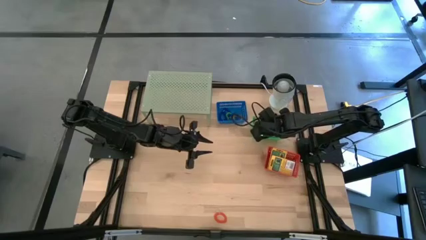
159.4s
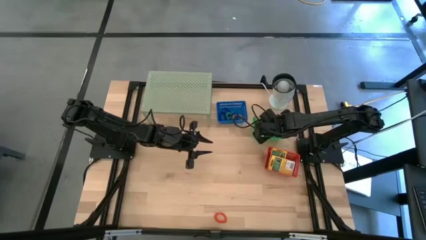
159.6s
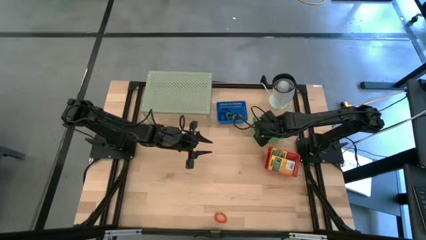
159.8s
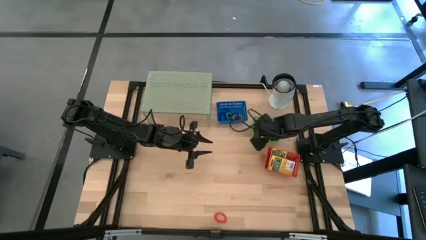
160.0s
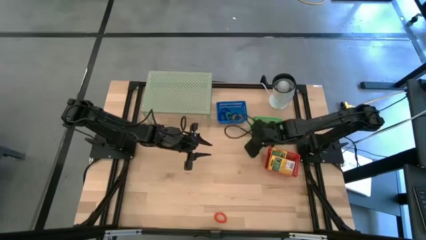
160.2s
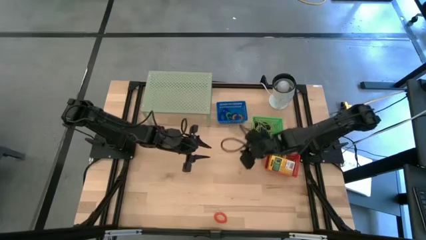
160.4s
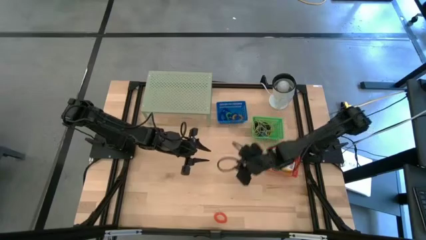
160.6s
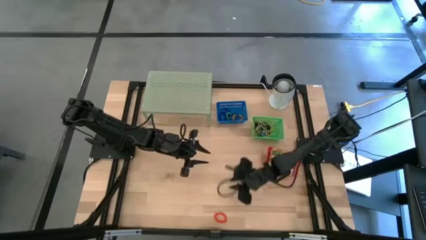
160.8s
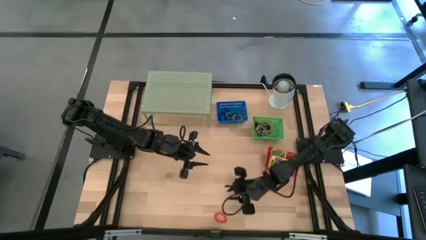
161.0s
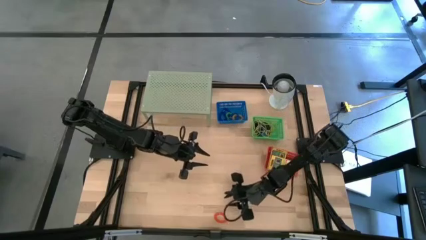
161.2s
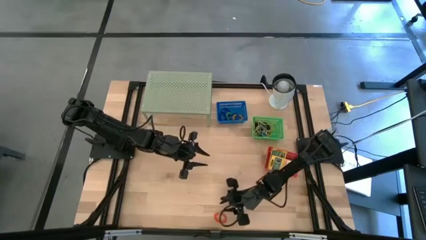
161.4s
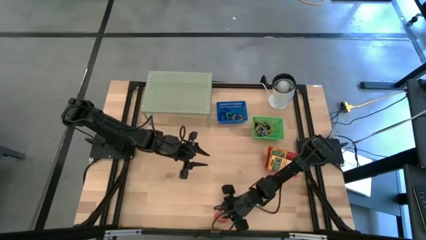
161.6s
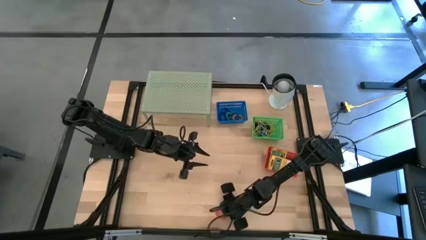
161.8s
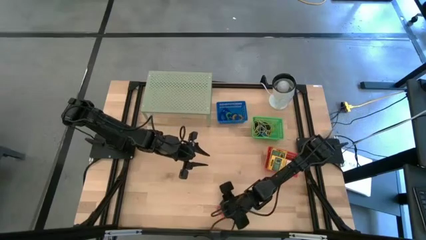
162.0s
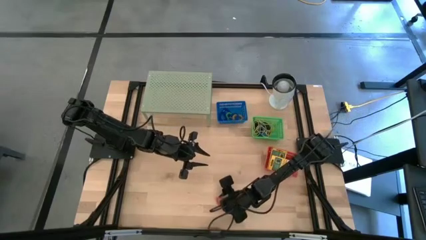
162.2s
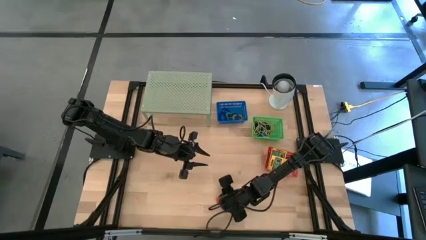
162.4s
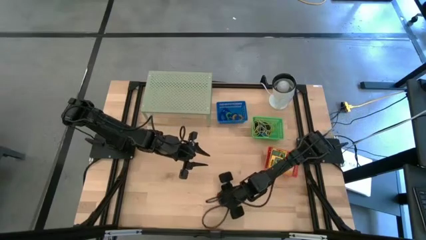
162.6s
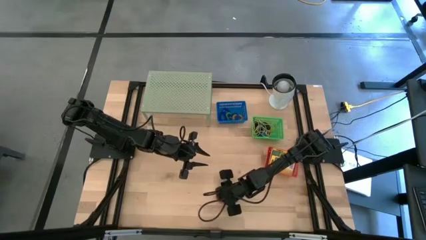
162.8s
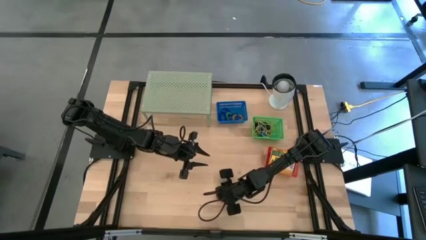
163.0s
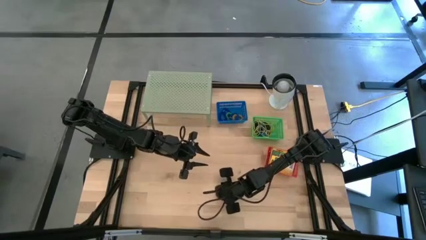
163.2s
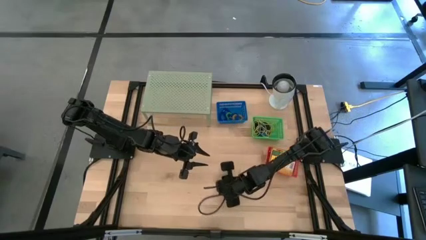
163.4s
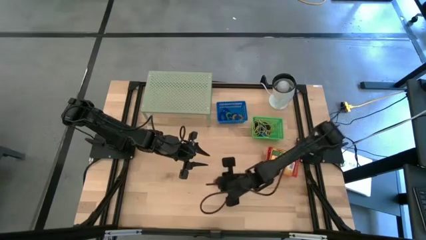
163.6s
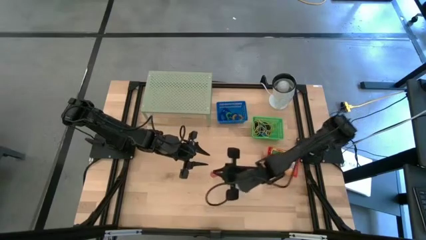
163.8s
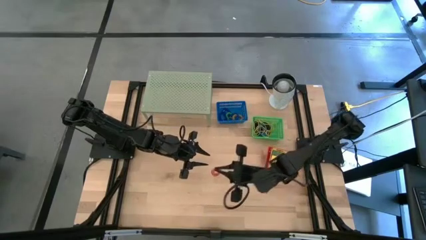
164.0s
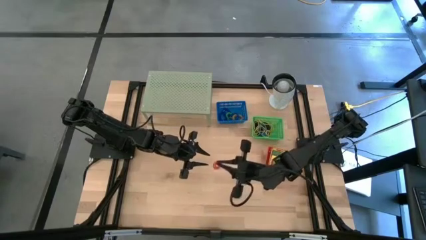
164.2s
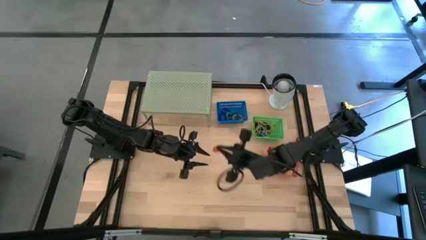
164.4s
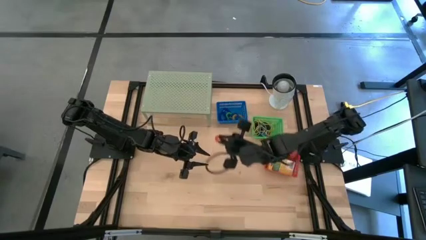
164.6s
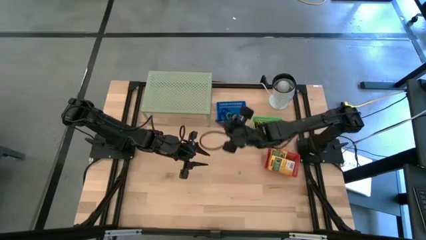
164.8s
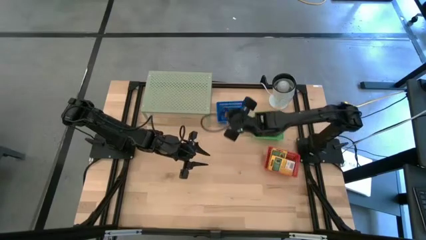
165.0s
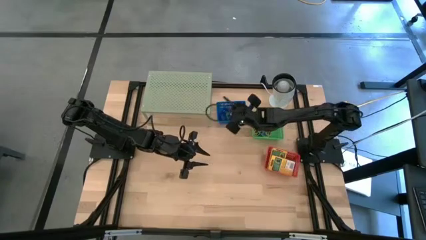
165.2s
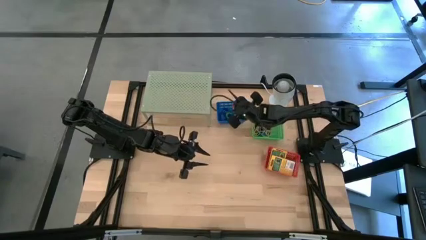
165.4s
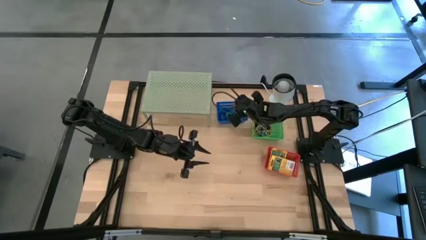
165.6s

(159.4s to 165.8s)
Task: Pick & Place Office Desk Supplies
Put the orange spring keychain into the blue bin

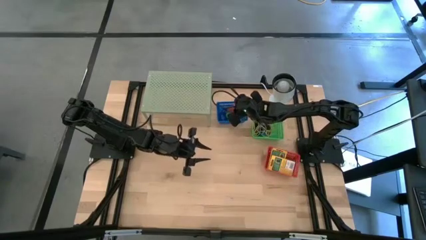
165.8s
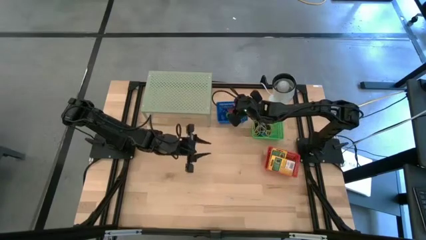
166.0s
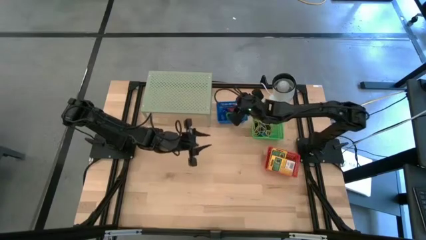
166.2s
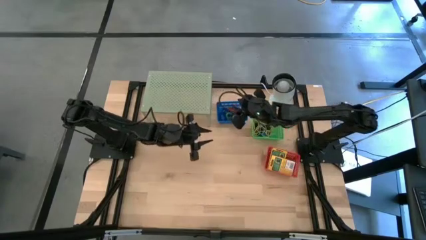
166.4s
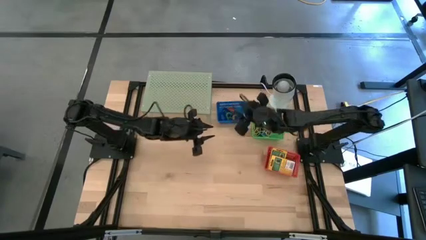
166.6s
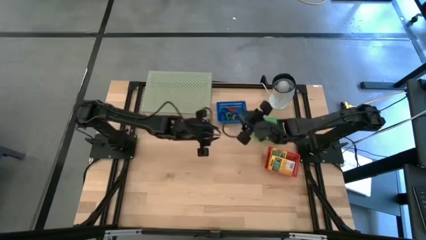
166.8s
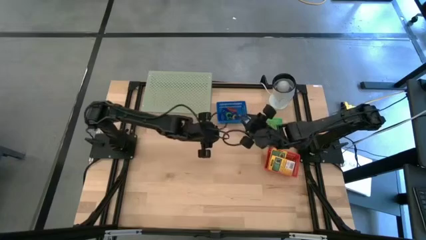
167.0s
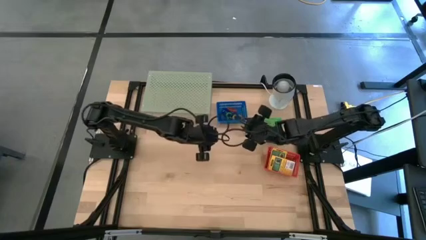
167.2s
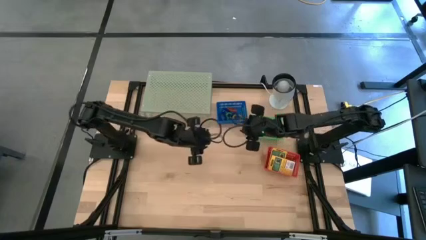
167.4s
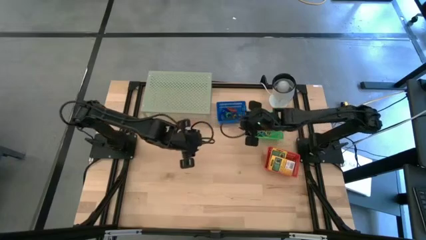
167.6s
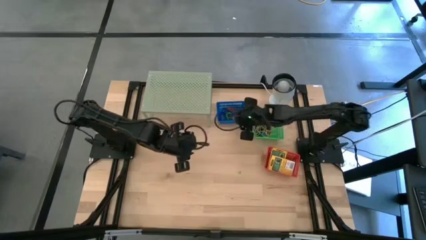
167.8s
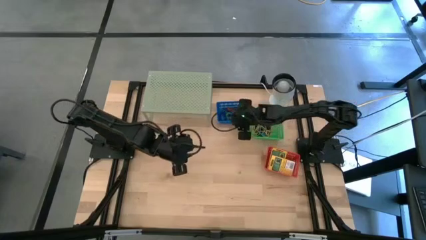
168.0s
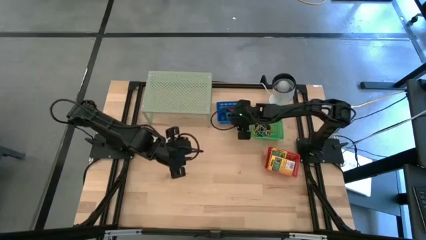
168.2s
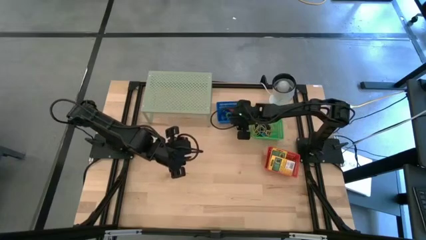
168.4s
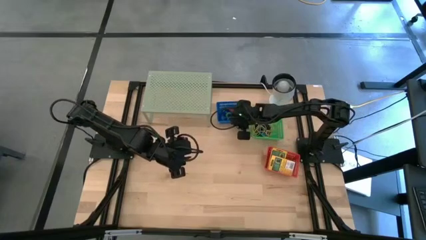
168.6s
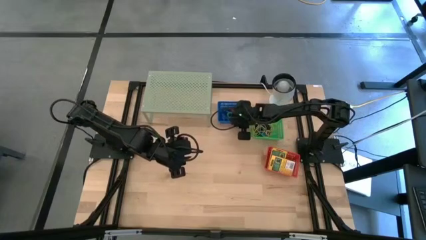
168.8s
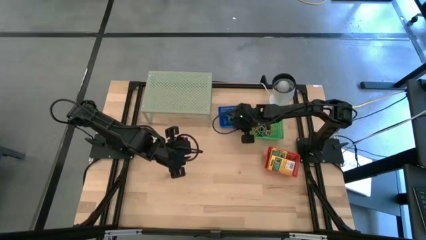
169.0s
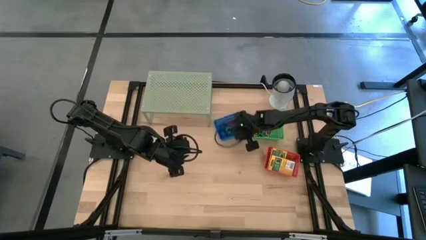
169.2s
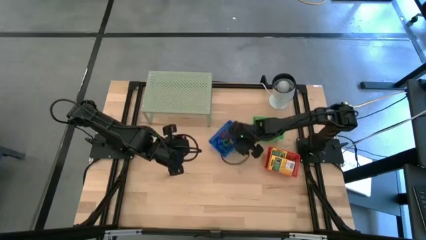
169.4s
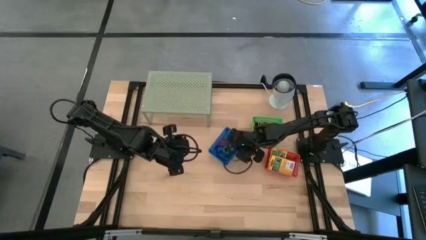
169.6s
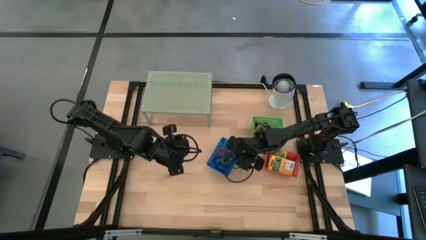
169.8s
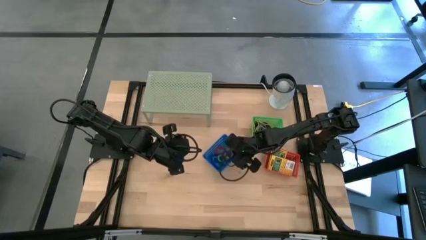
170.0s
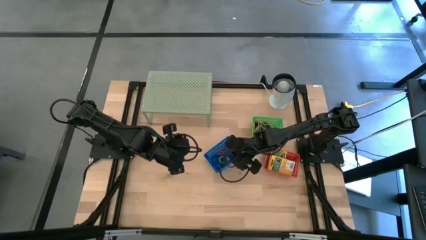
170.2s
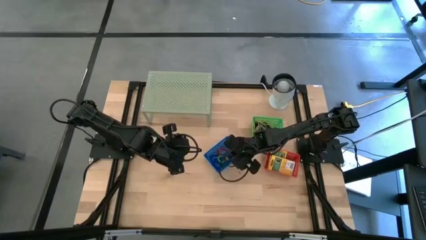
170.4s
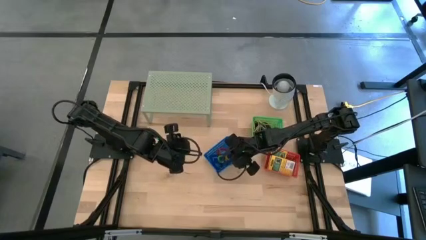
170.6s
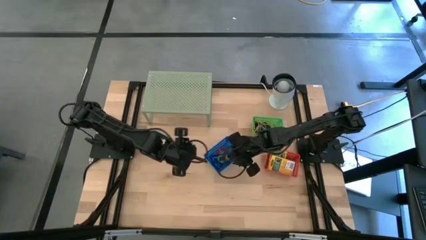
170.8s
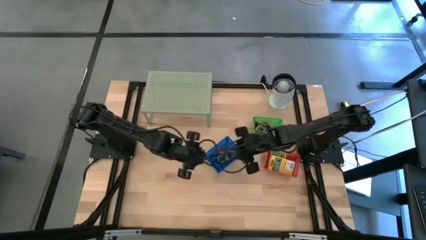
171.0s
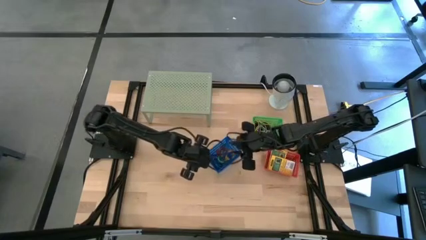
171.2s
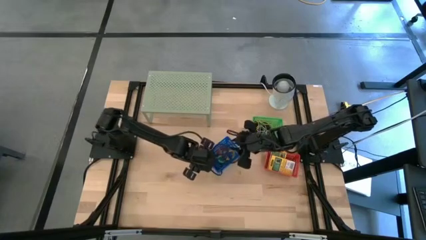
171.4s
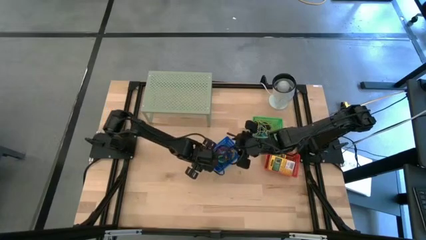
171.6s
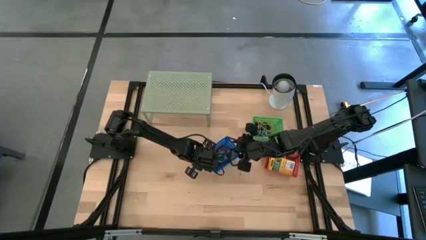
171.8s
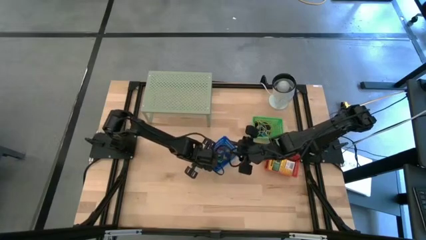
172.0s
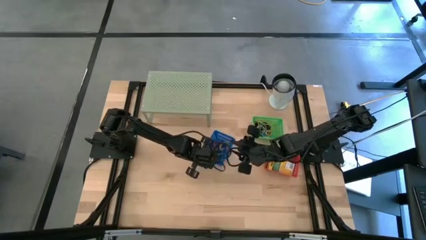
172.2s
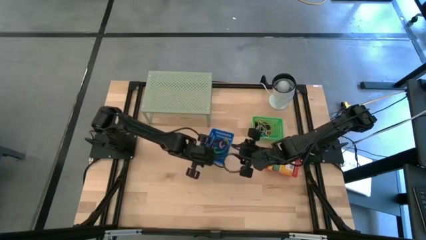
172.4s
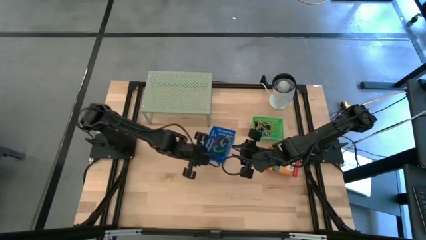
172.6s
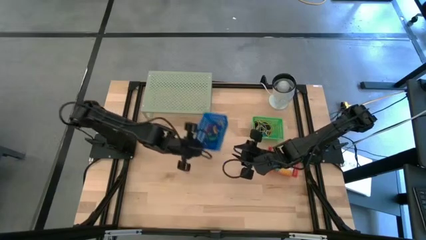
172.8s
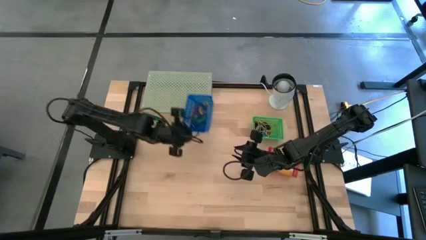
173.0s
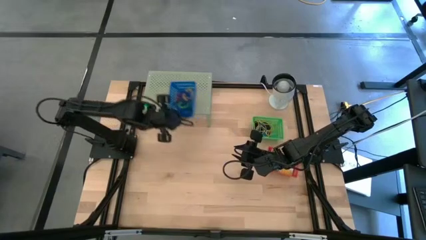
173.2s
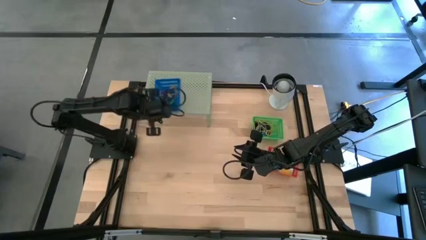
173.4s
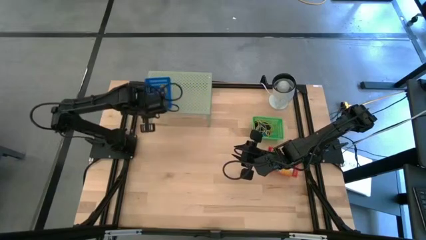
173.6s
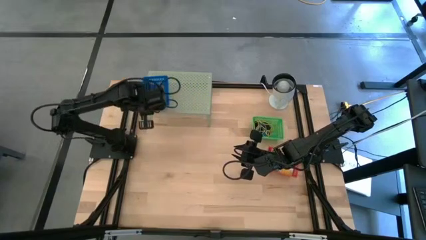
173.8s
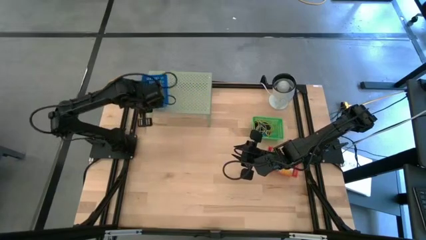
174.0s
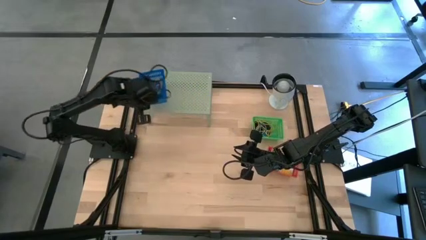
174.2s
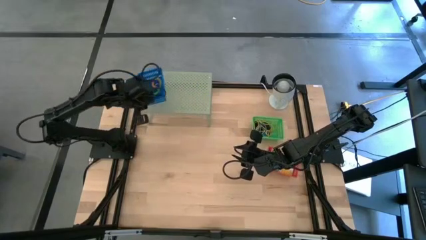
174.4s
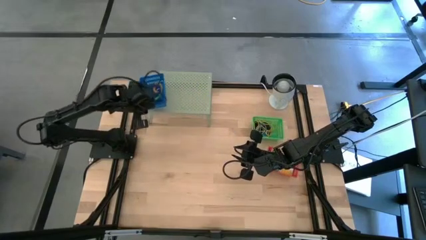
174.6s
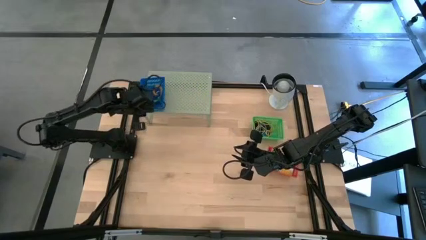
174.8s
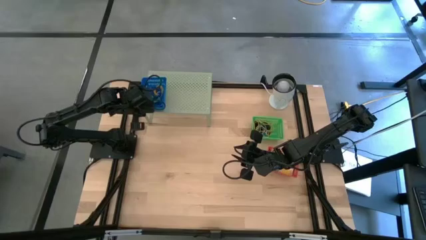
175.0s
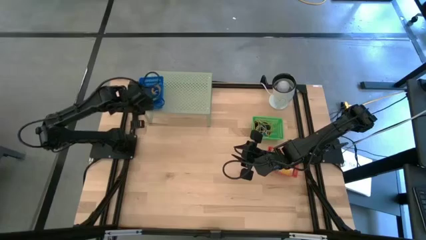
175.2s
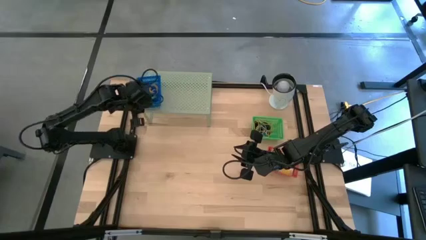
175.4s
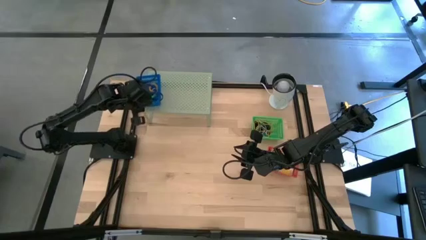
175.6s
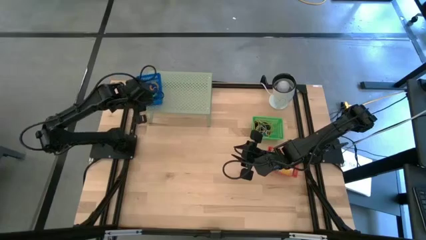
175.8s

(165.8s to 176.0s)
Put the blue bin on the shelf
